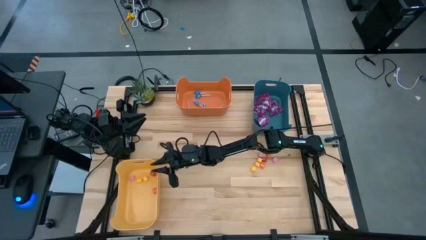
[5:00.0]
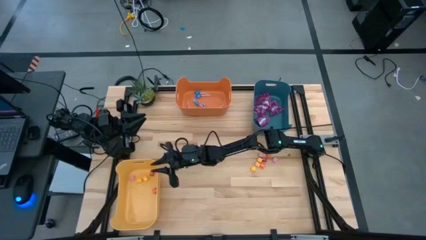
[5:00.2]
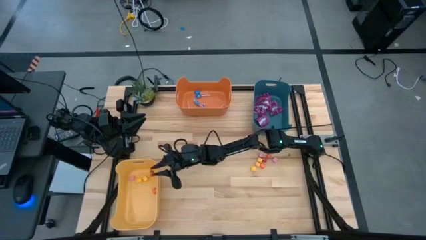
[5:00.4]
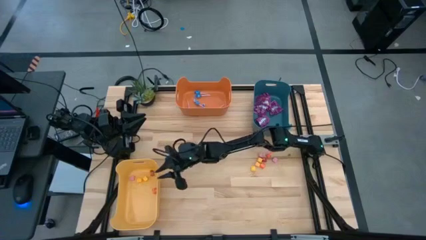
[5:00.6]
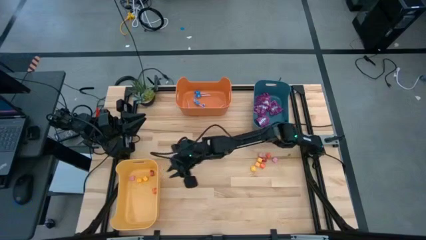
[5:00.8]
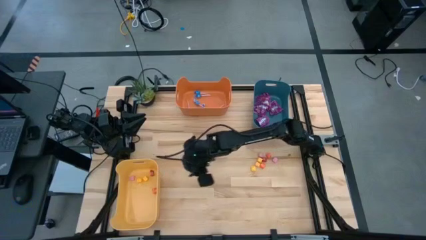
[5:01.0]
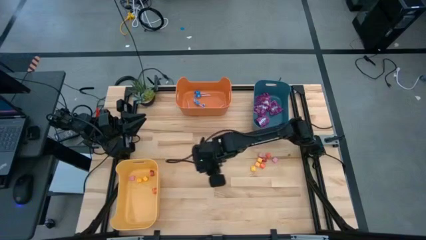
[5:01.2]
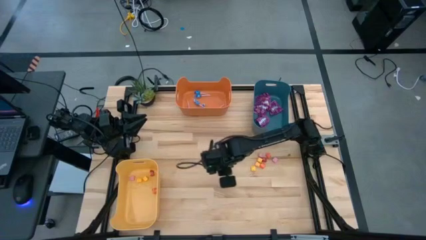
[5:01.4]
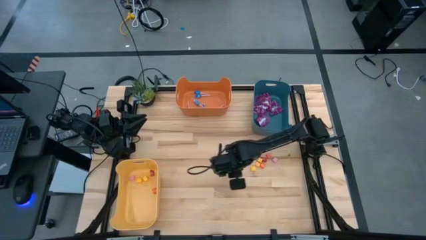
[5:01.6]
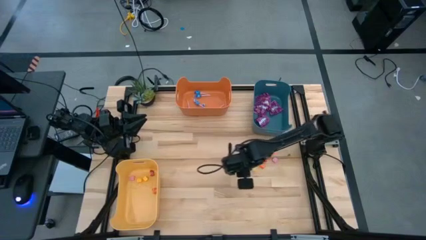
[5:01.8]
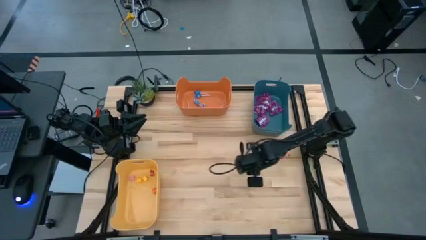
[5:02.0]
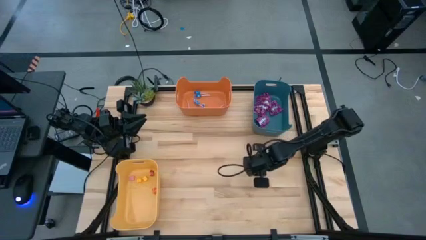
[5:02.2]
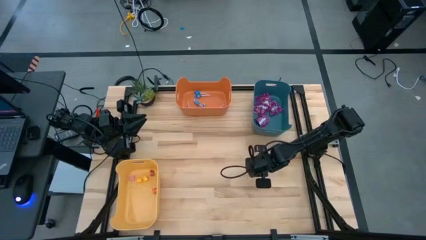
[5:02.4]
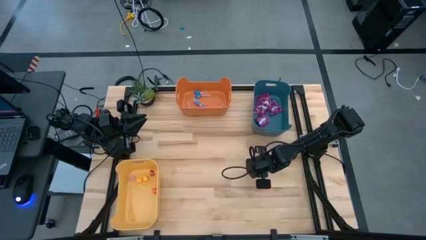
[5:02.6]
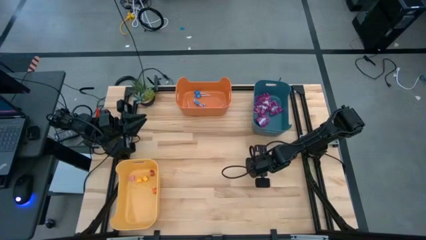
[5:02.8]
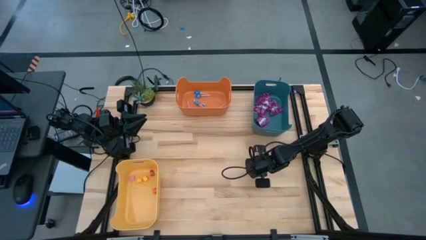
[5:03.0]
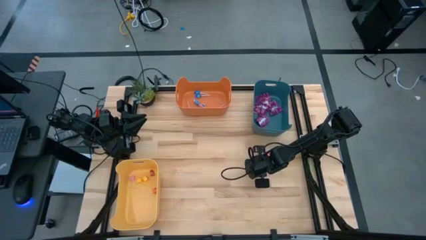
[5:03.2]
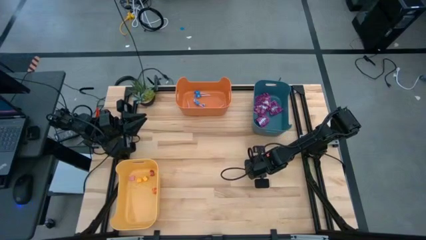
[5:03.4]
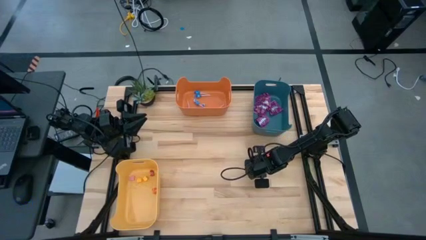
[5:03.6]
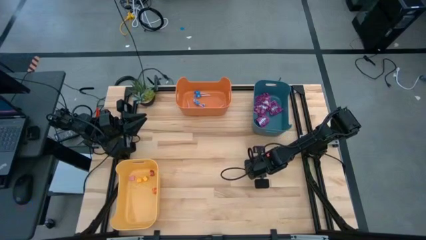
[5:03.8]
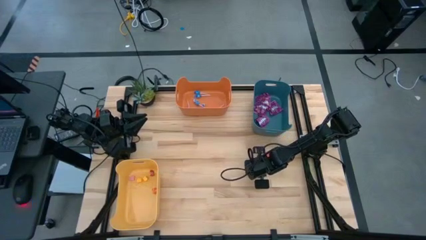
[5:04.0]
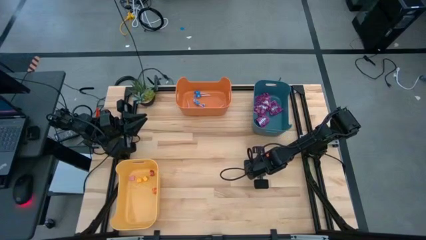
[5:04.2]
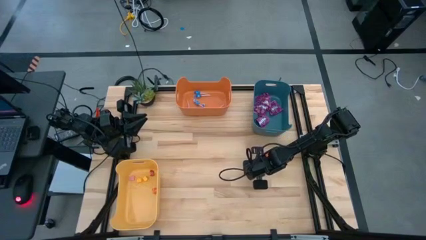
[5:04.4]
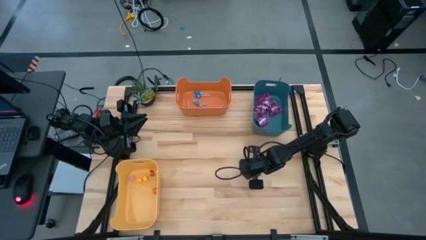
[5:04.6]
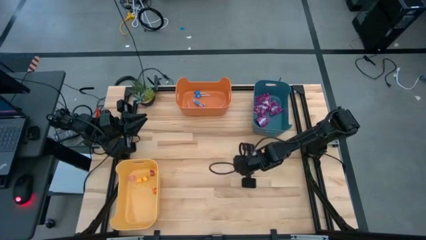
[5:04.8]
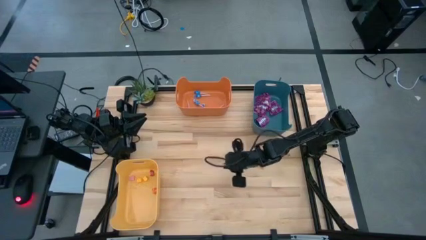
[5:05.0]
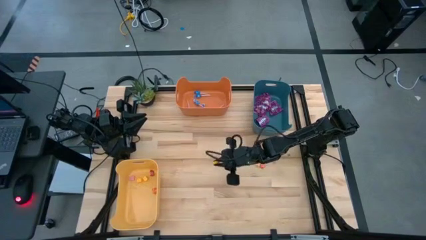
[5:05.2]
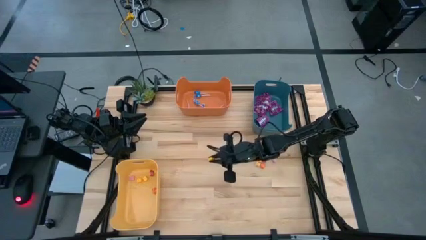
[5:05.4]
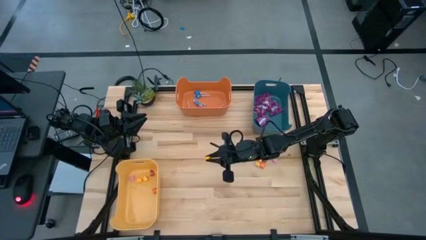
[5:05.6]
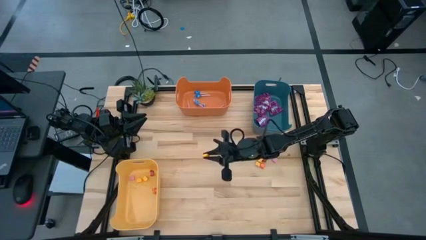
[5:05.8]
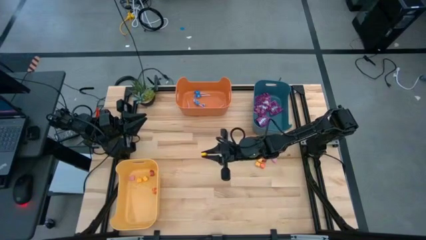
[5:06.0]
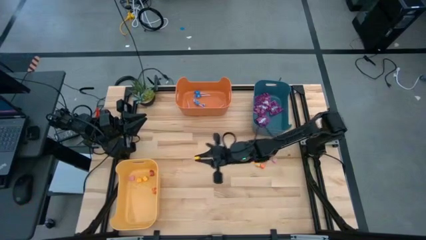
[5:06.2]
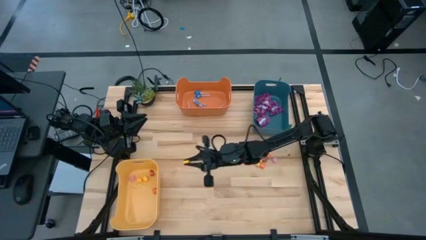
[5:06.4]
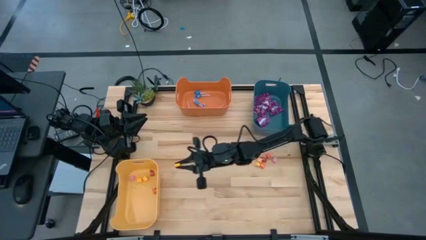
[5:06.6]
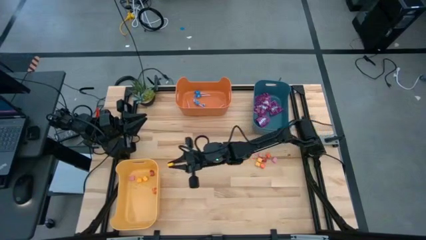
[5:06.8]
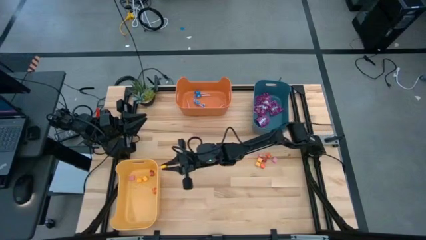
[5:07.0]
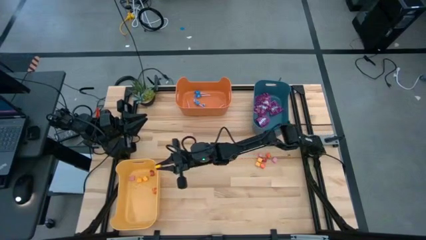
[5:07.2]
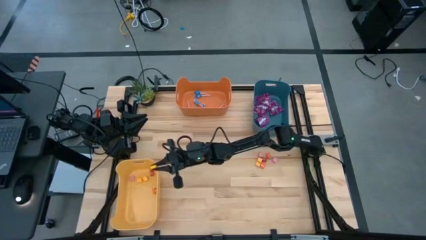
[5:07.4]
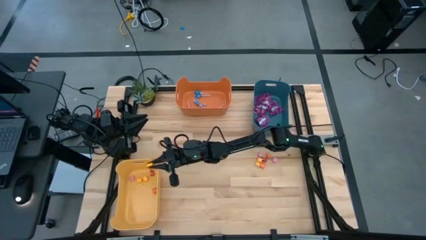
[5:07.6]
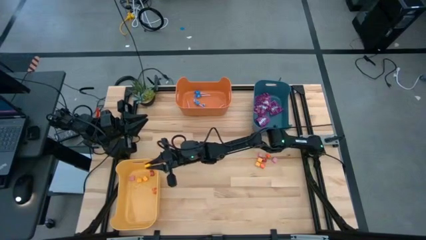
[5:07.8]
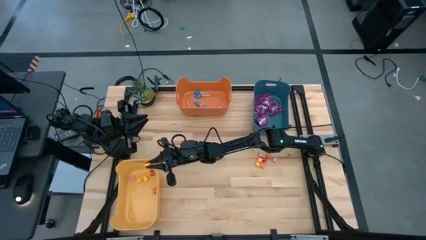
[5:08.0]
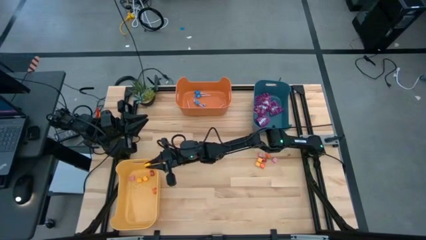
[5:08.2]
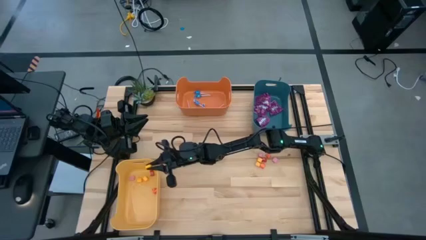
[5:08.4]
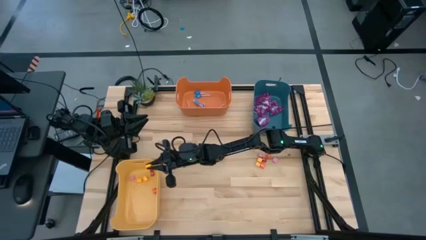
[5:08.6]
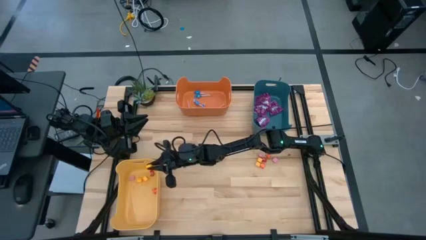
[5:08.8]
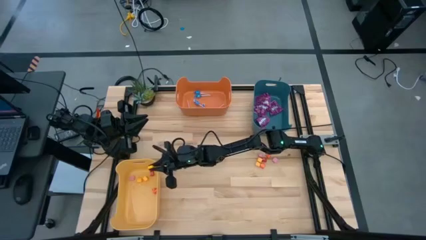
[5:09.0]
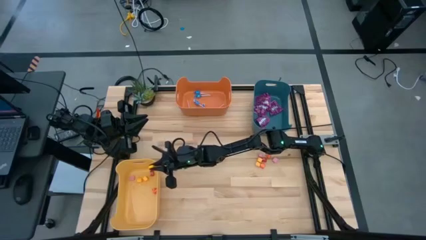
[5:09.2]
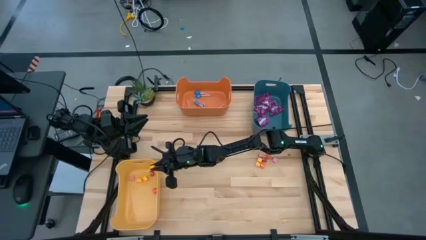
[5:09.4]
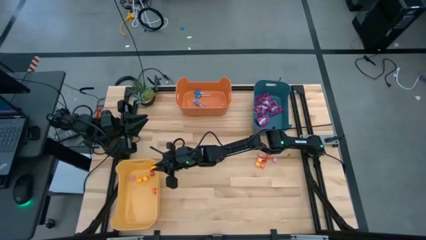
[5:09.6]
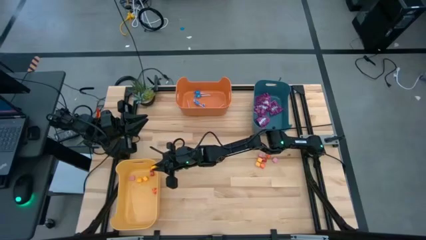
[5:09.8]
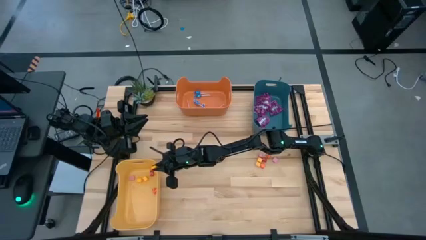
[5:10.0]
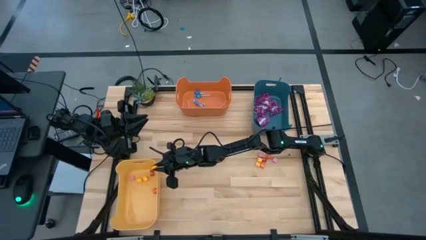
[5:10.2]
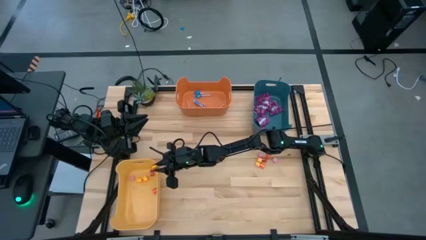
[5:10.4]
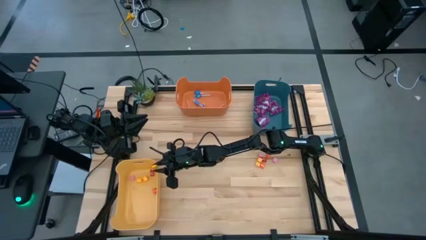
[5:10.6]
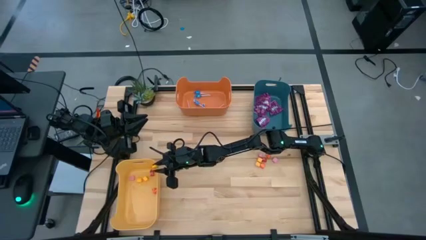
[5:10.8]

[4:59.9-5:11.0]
Task: Sort candy
Put the yellow candy into the yellow bin
